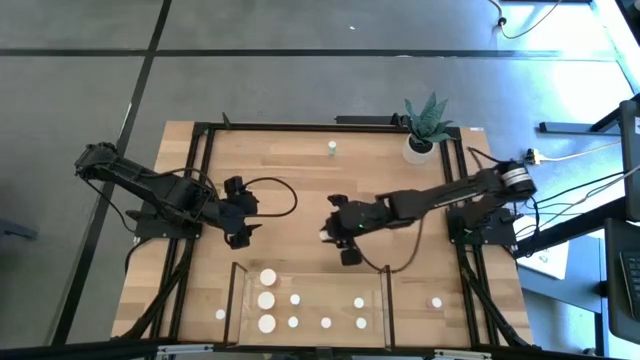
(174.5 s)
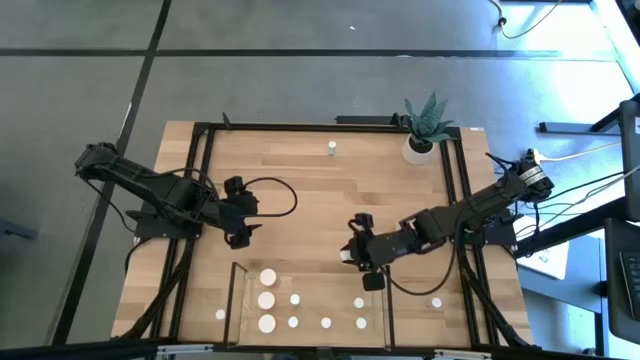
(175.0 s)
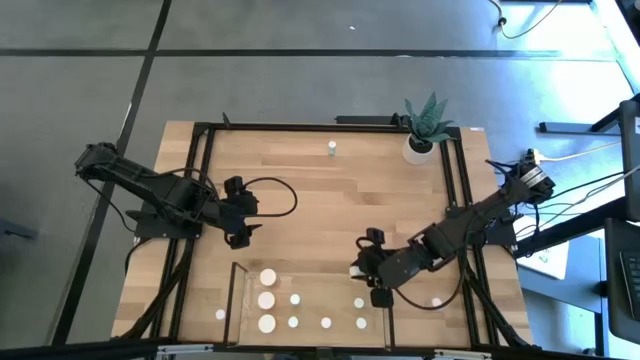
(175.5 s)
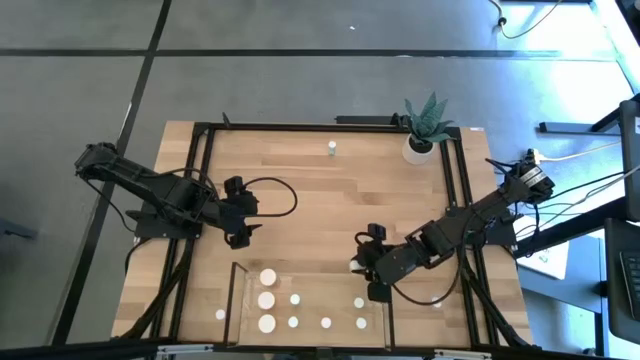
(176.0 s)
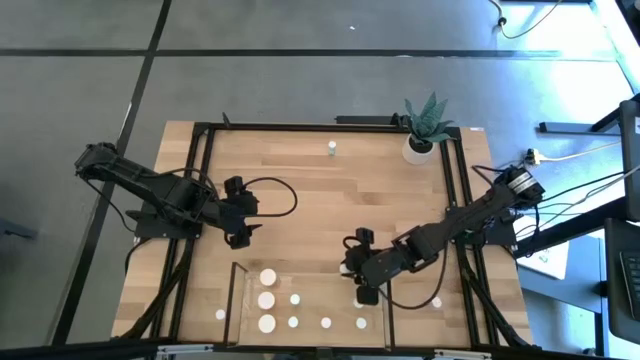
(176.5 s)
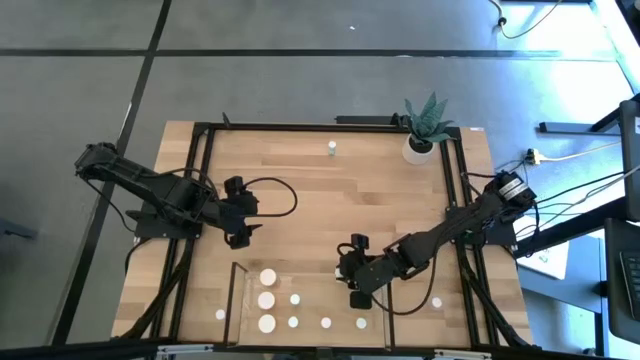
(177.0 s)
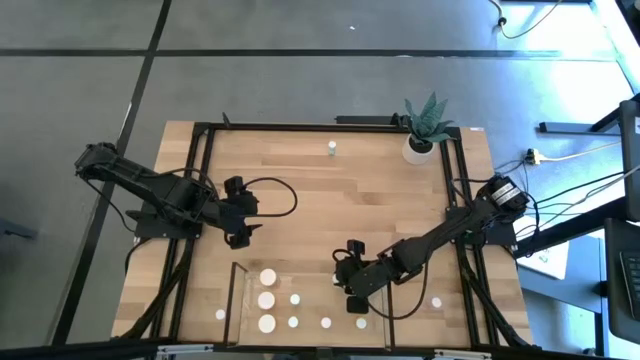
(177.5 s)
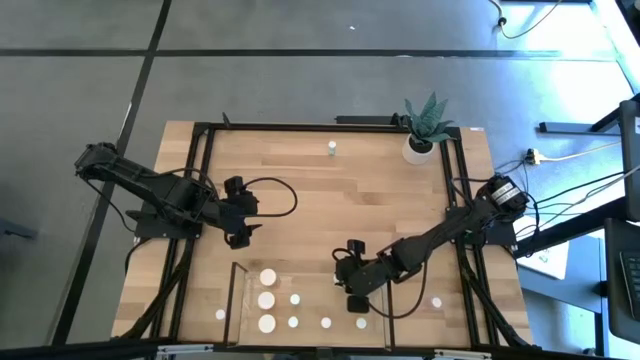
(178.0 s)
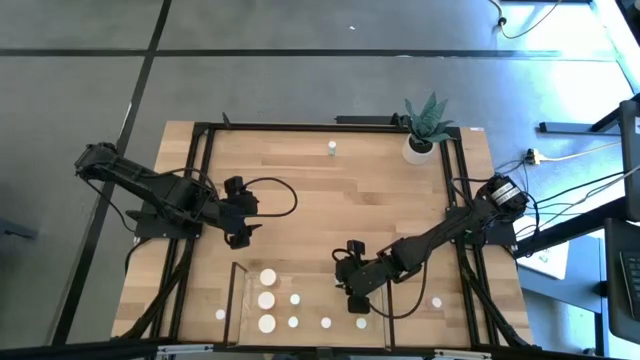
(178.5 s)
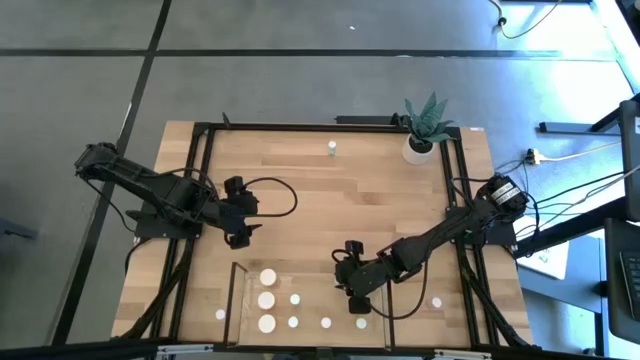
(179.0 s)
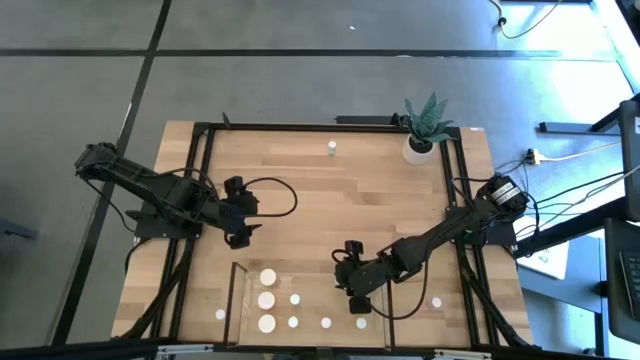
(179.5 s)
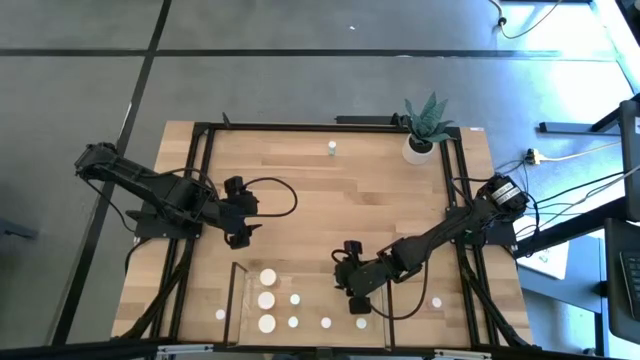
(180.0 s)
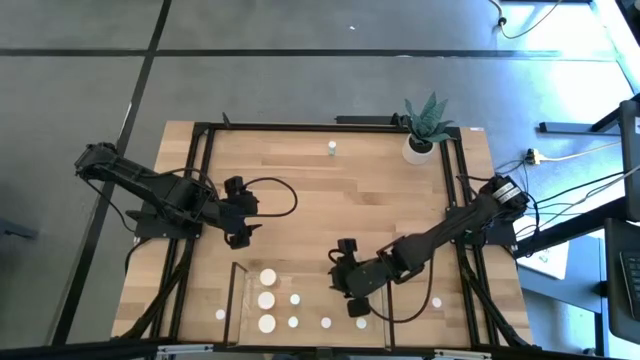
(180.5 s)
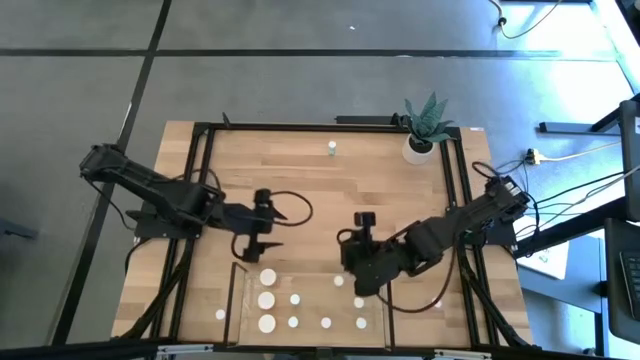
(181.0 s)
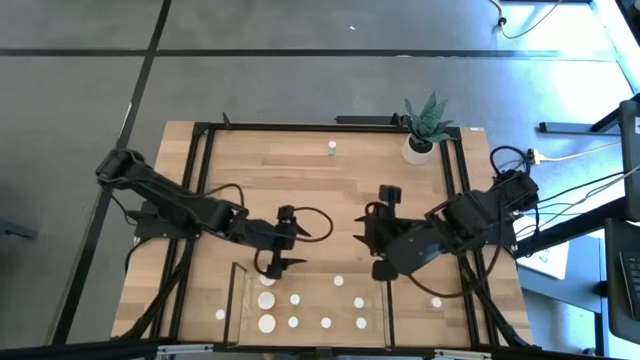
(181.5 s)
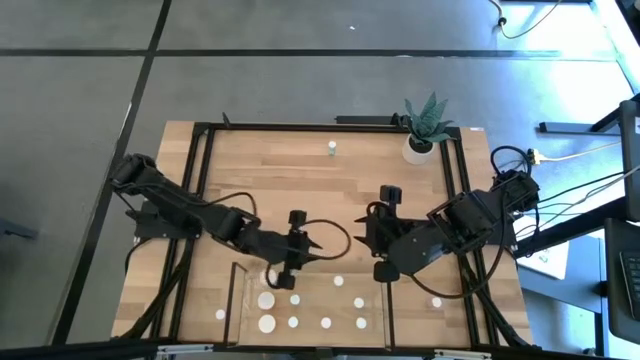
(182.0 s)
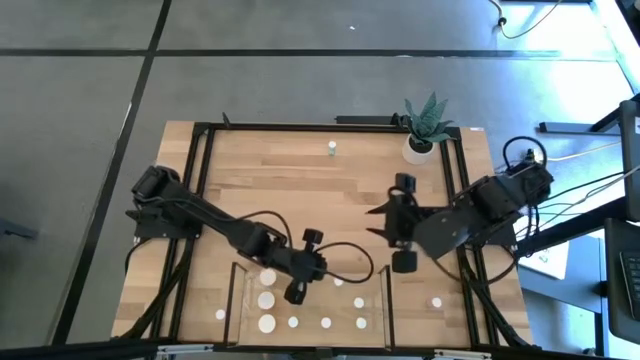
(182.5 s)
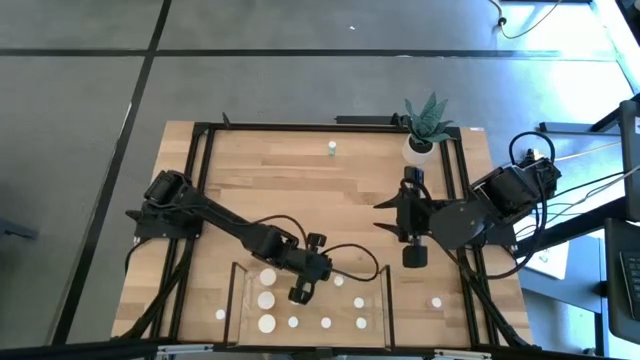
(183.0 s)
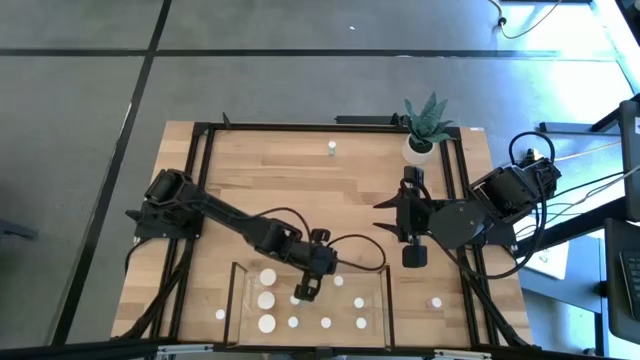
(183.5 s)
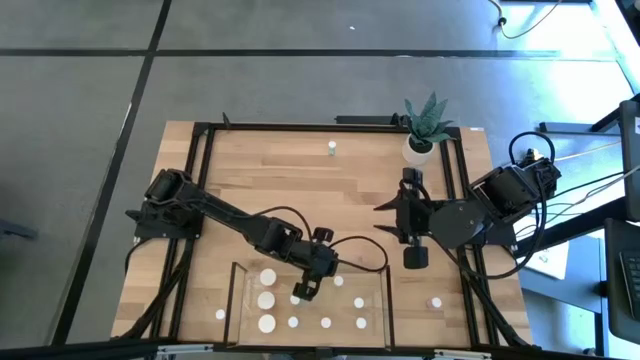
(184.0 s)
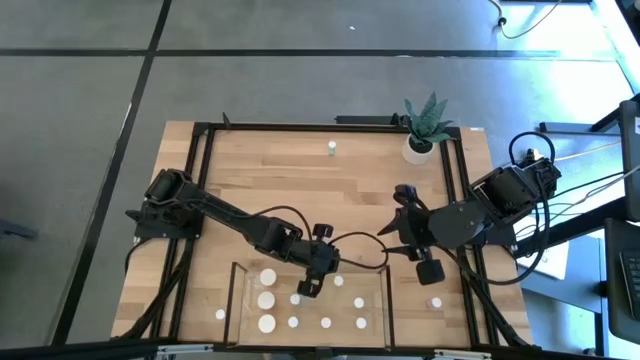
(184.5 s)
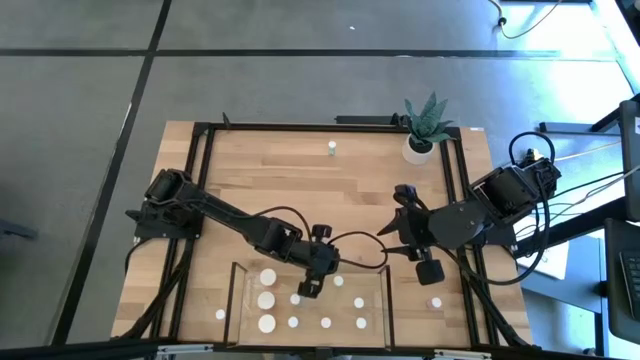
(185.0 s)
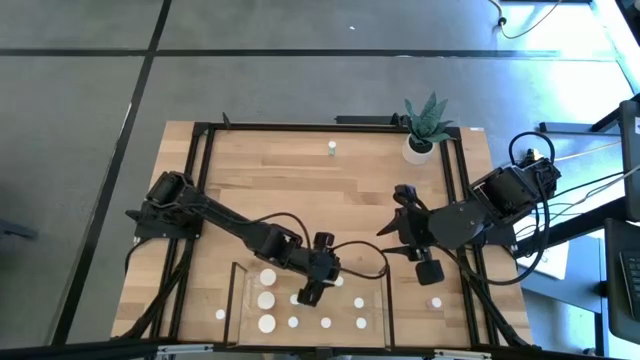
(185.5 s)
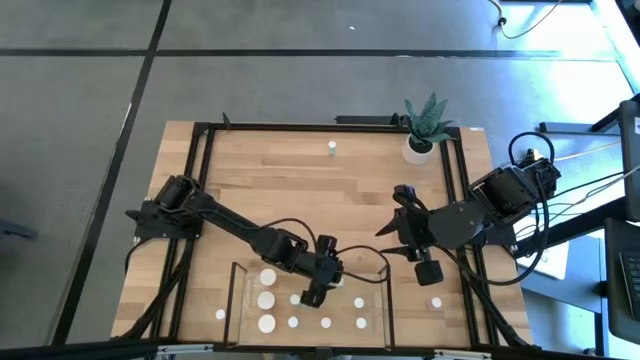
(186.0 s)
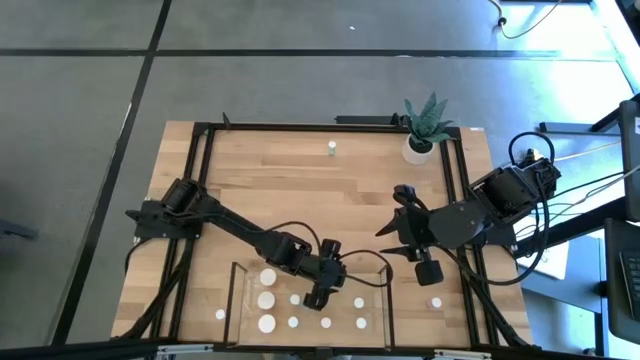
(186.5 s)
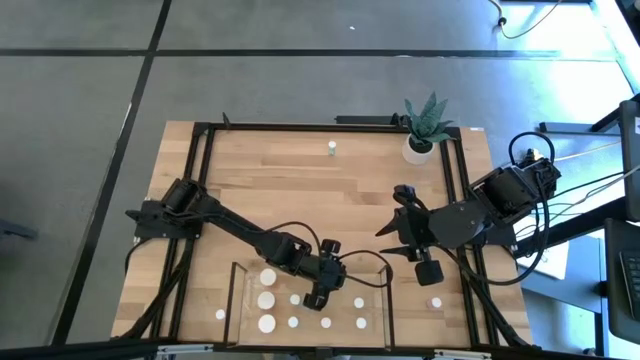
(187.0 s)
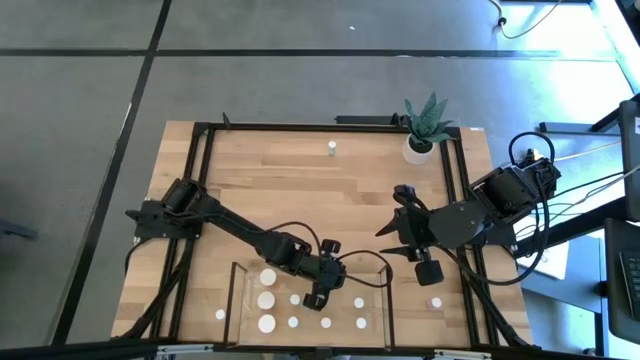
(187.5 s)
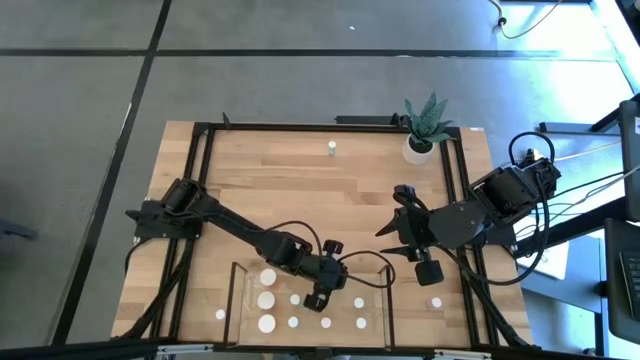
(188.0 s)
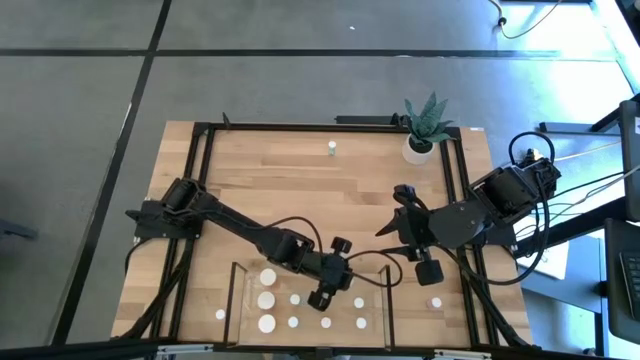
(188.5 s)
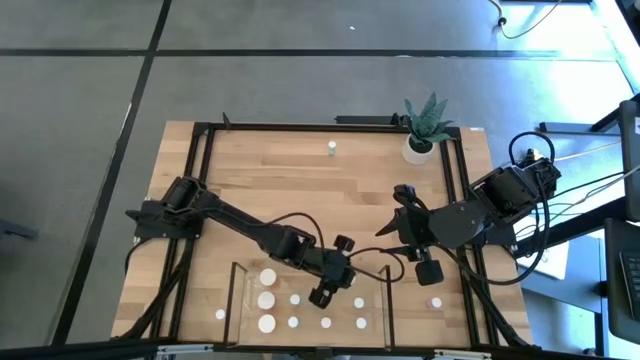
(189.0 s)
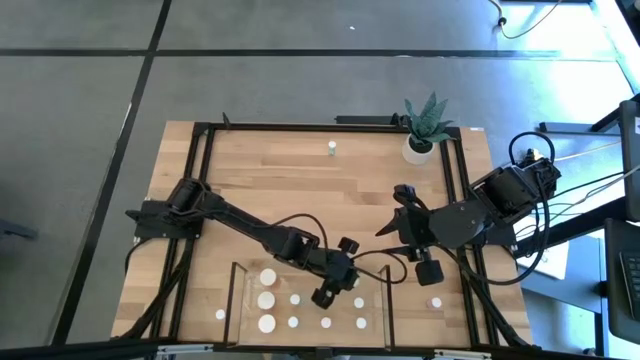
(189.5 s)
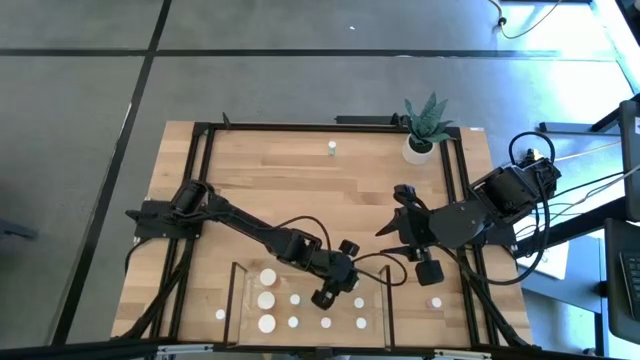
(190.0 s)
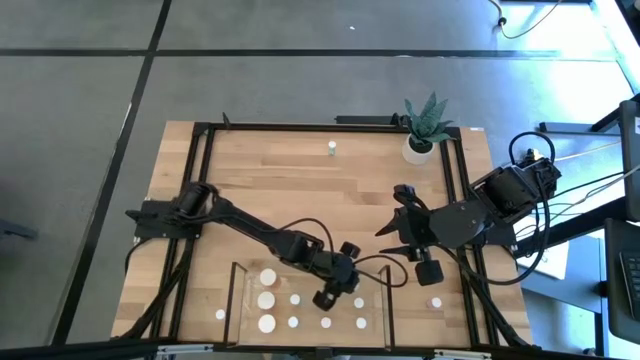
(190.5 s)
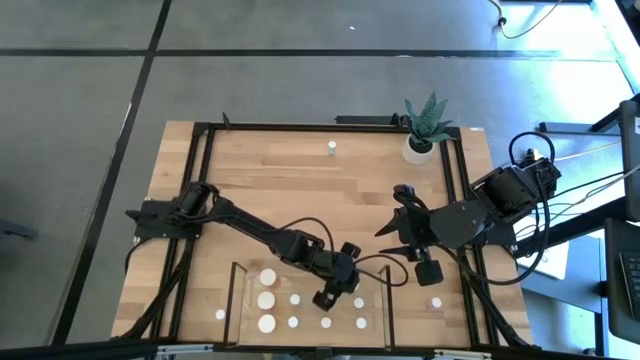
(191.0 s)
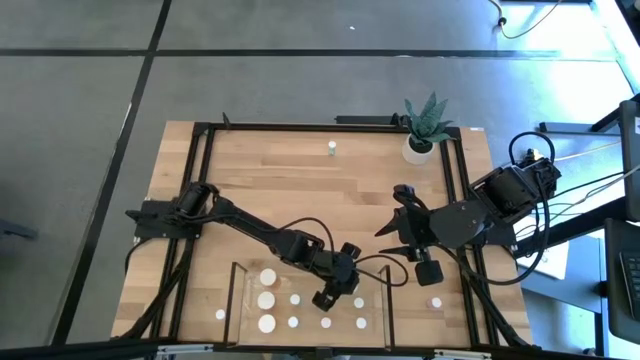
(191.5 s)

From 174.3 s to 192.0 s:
Task: Pick and place medicine bottles onto shelf by color
Put the yellow pill bottle on the shelf aligned with the other yellow pill bottles

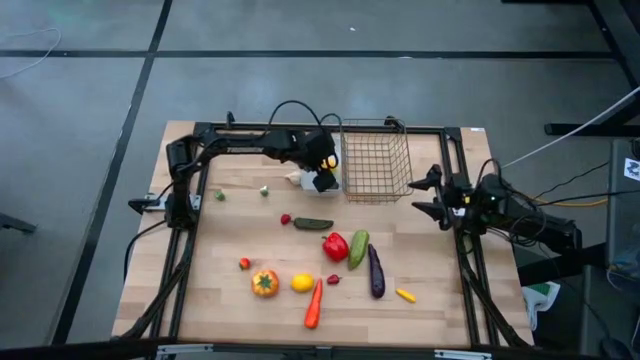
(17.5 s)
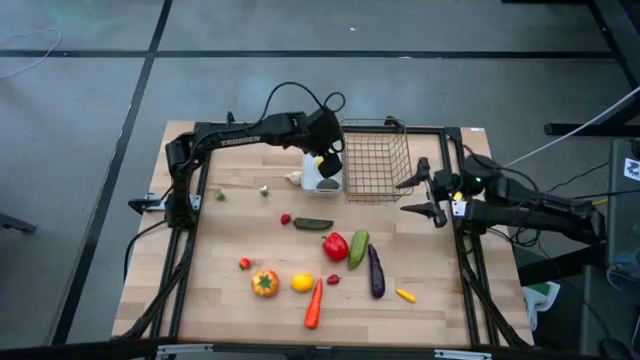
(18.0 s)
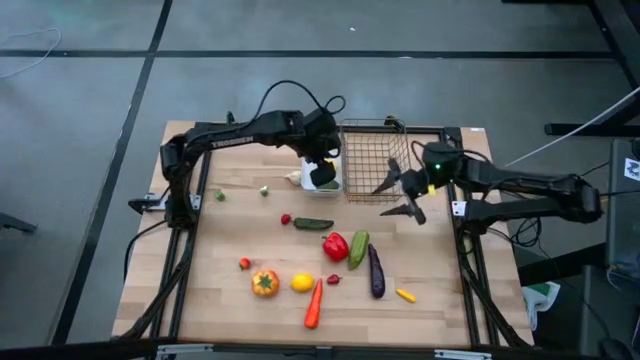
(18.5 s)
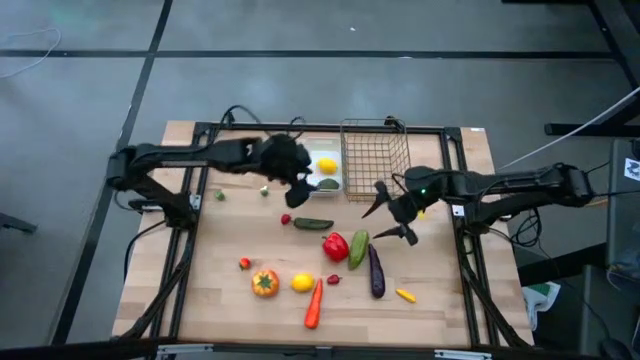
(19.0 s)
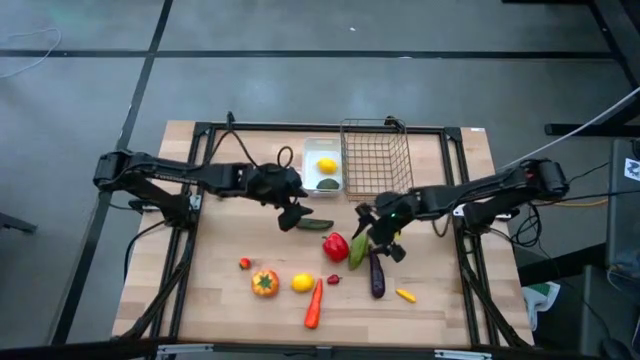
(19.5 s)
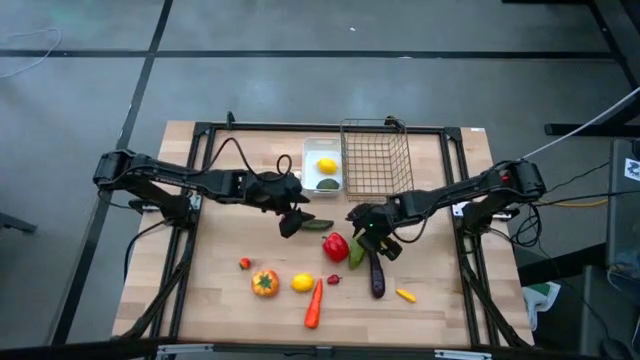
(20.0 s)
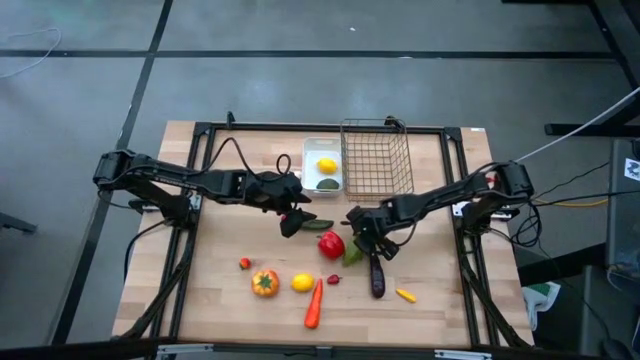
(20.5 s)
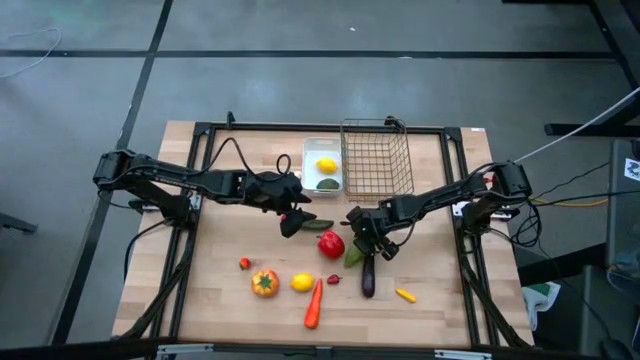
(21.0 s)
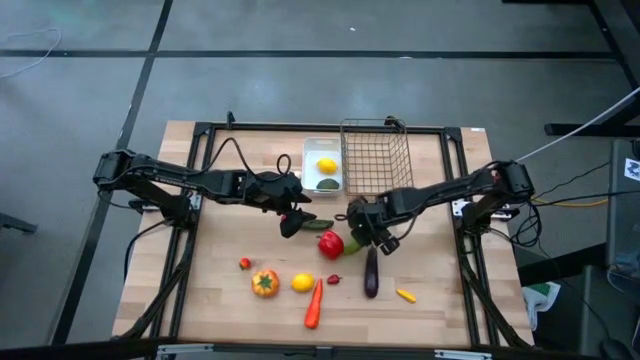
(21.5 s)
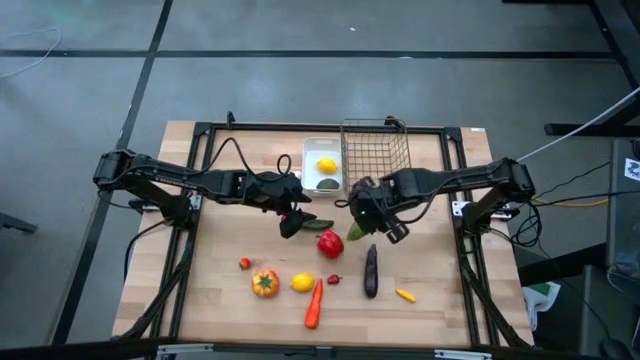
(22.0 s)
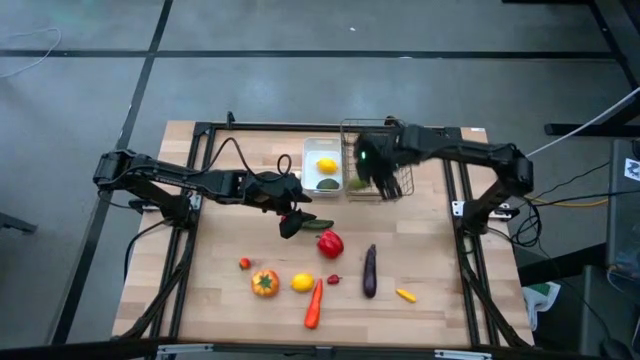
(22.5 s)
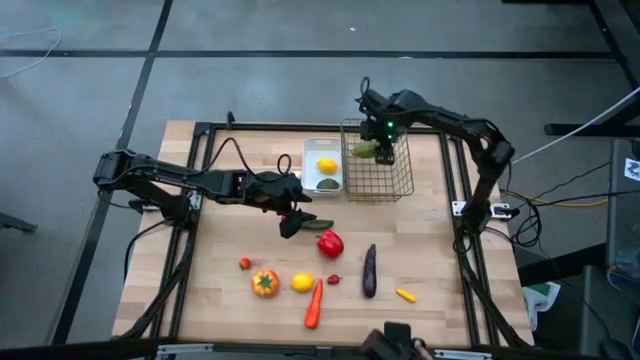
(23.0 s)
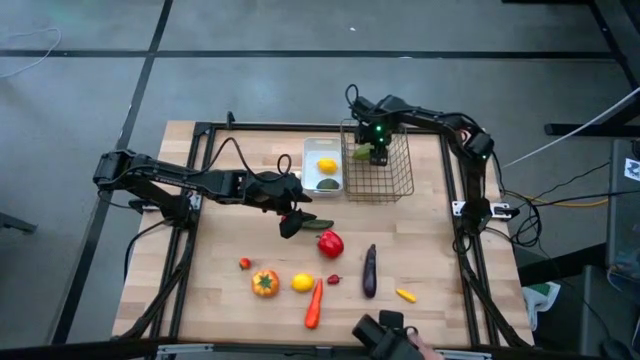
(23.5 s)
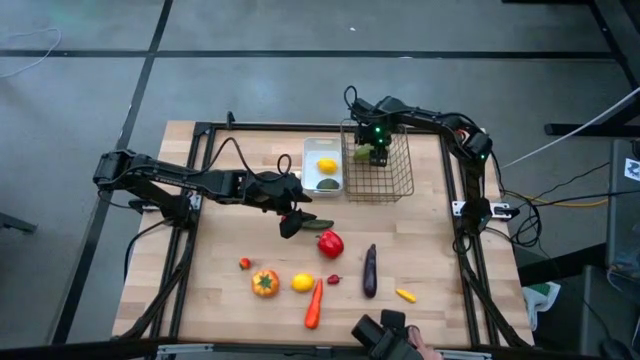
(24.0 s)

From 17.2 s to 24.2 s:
Task: Sort produce into baskets
Put the green cucumber into the gold wire basket
